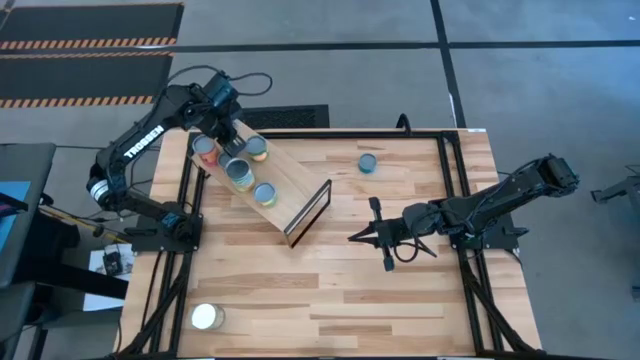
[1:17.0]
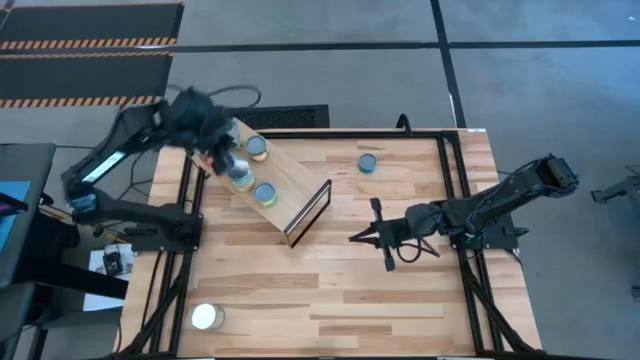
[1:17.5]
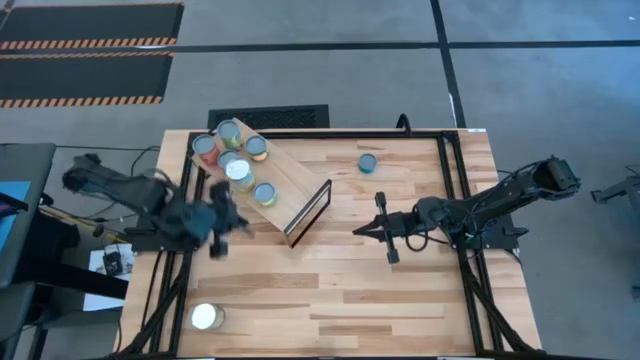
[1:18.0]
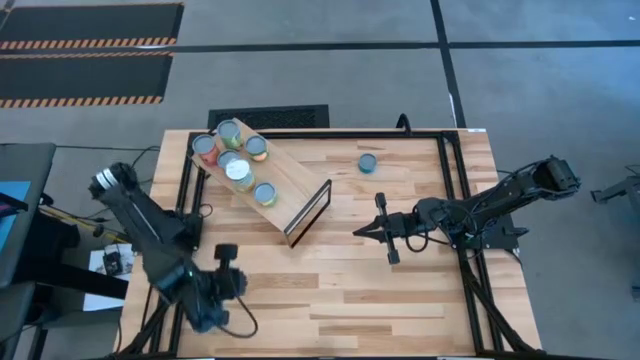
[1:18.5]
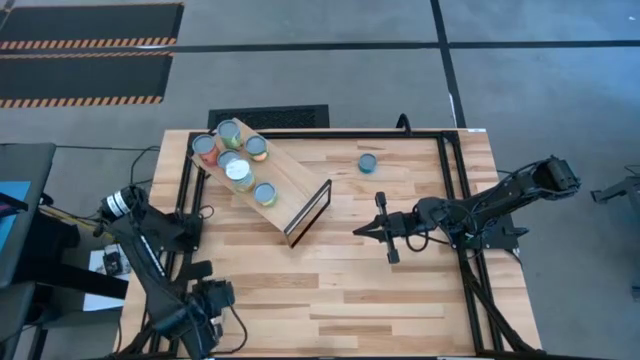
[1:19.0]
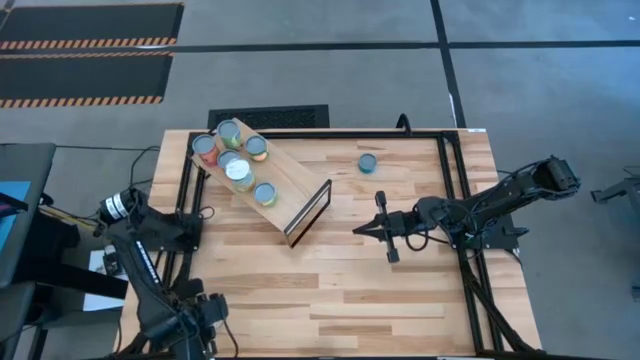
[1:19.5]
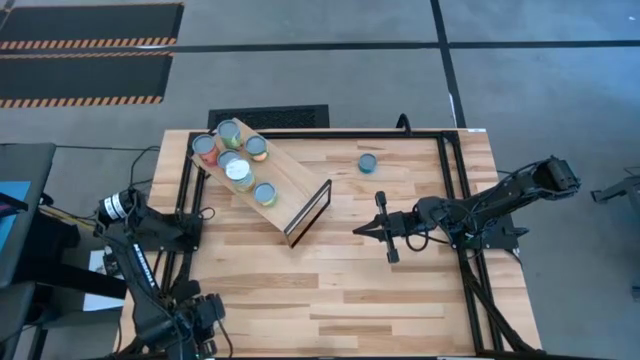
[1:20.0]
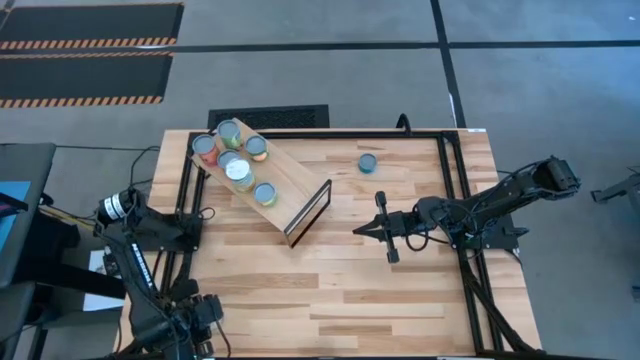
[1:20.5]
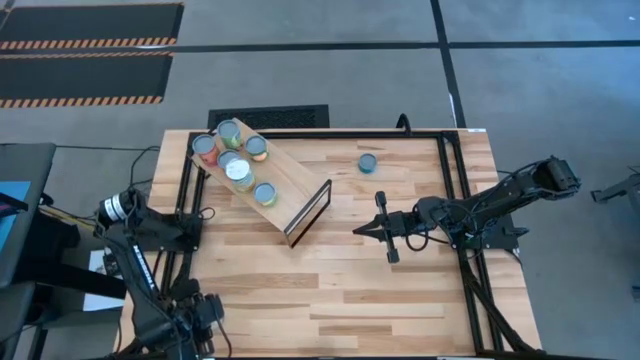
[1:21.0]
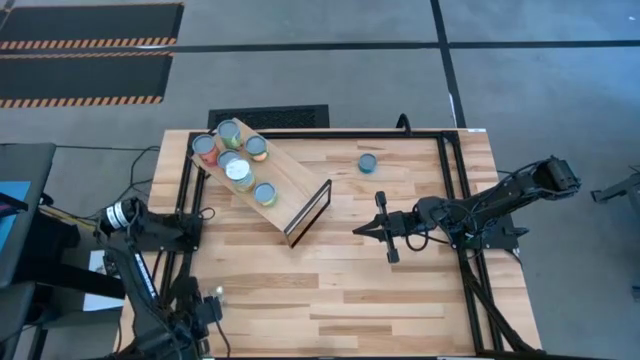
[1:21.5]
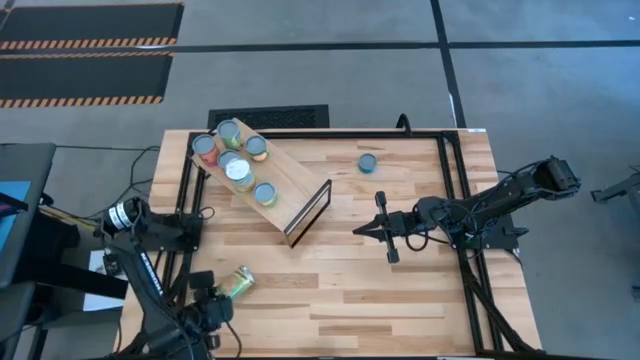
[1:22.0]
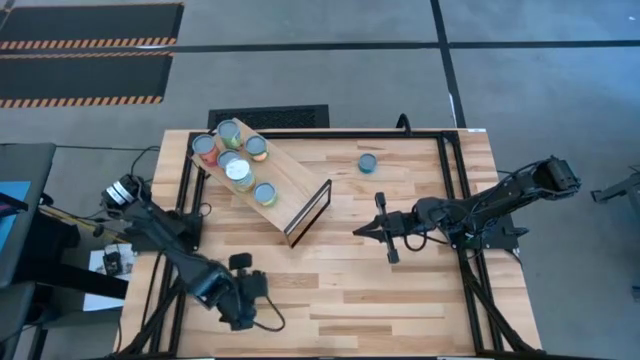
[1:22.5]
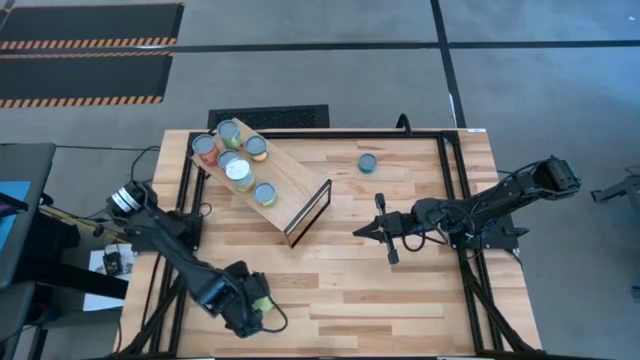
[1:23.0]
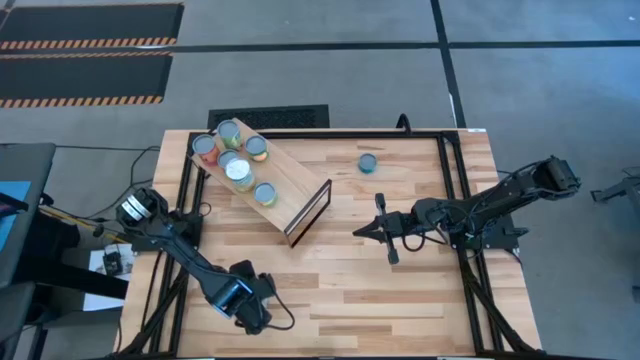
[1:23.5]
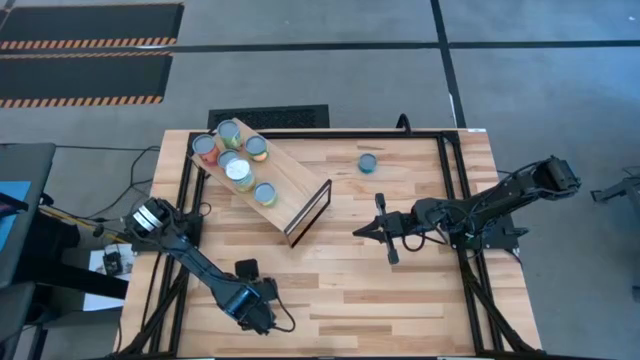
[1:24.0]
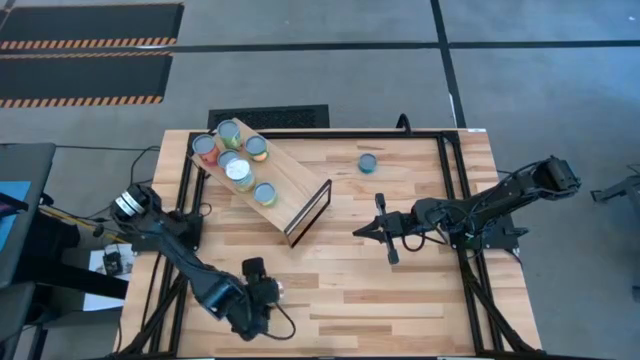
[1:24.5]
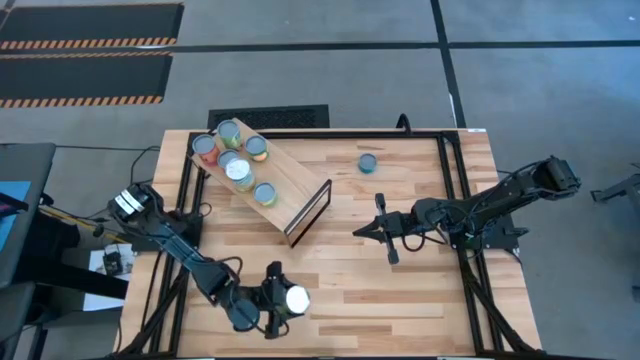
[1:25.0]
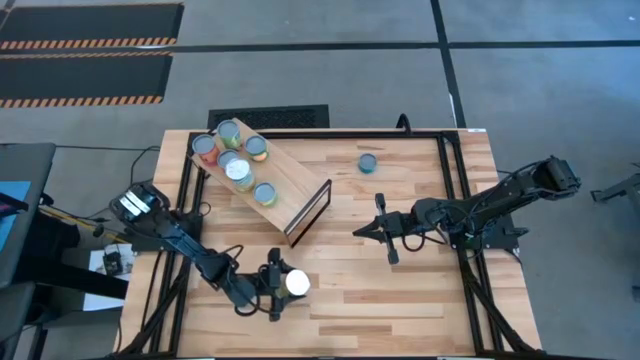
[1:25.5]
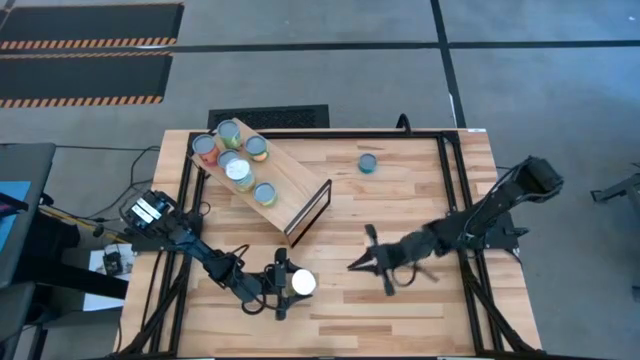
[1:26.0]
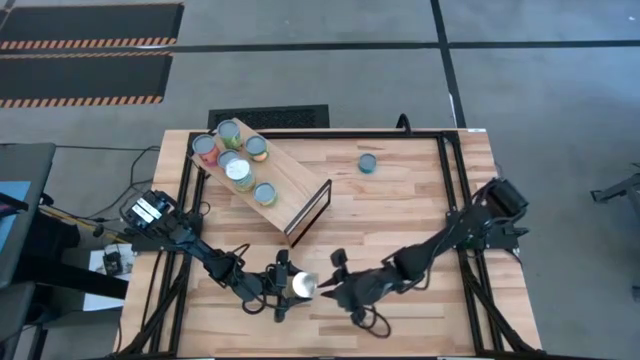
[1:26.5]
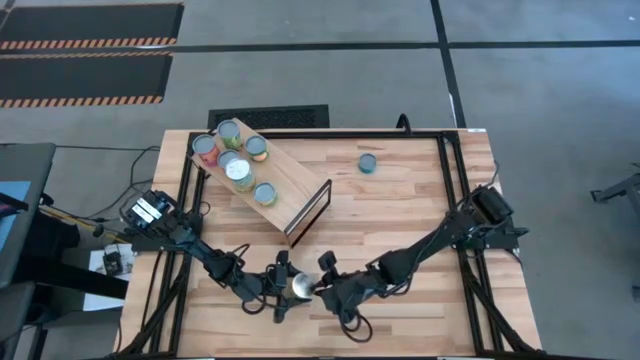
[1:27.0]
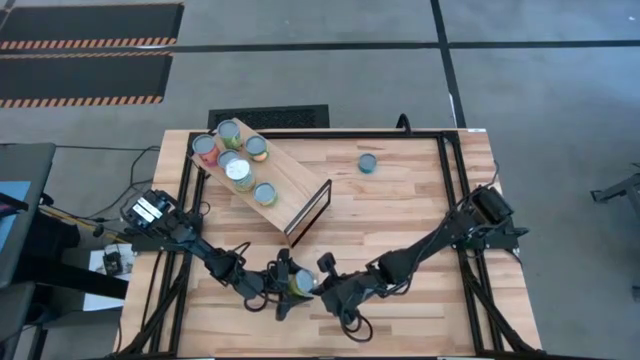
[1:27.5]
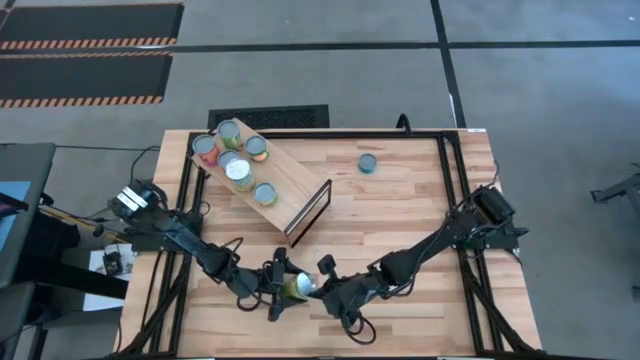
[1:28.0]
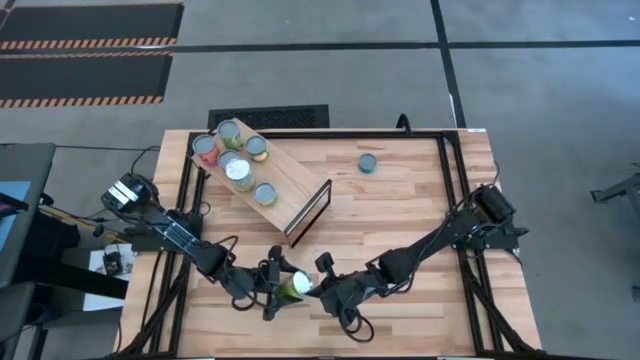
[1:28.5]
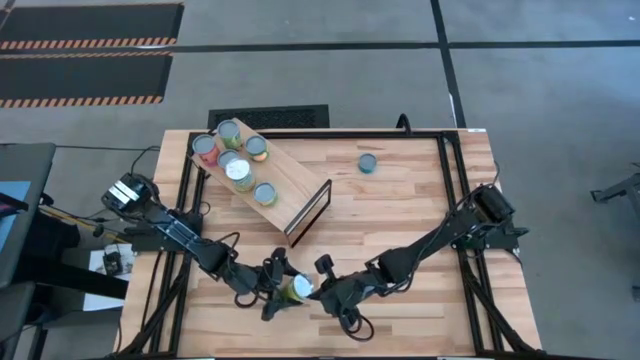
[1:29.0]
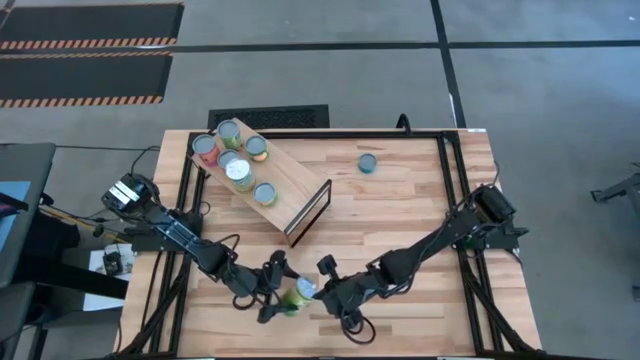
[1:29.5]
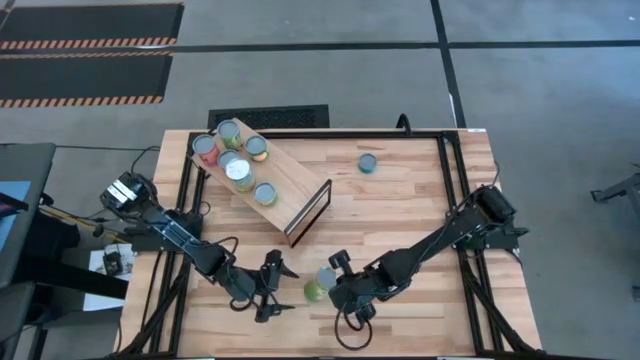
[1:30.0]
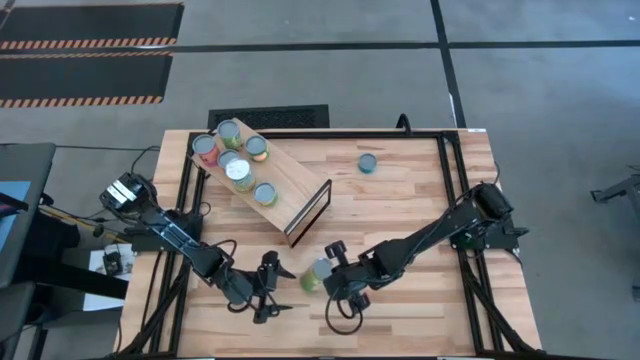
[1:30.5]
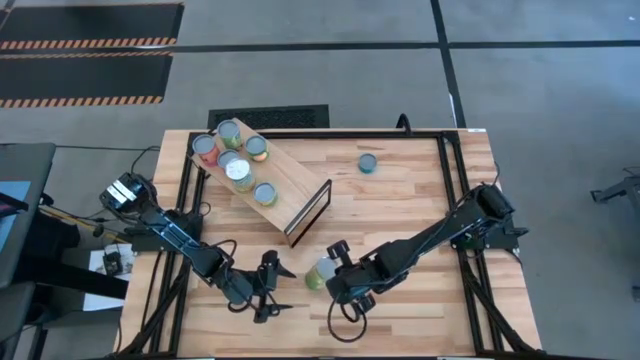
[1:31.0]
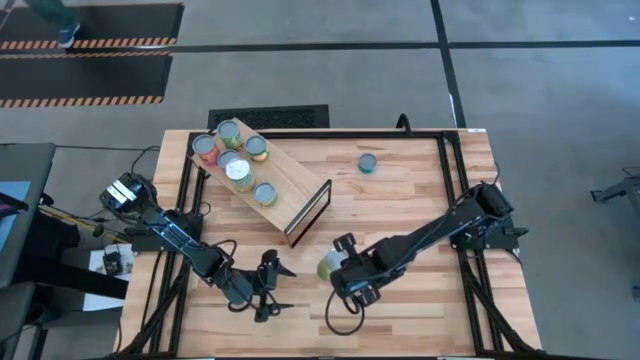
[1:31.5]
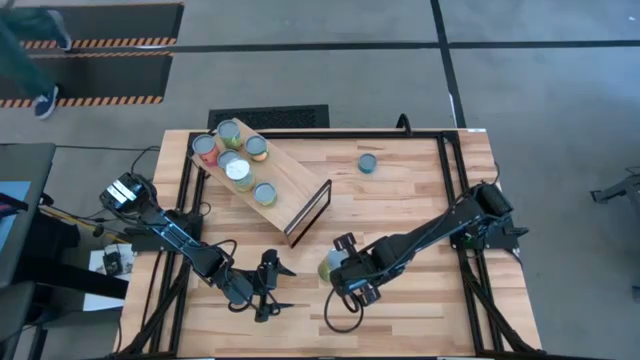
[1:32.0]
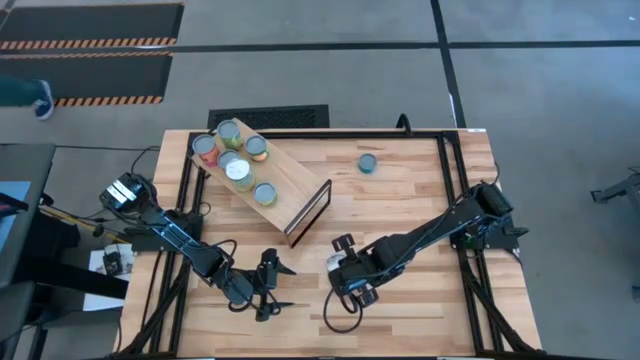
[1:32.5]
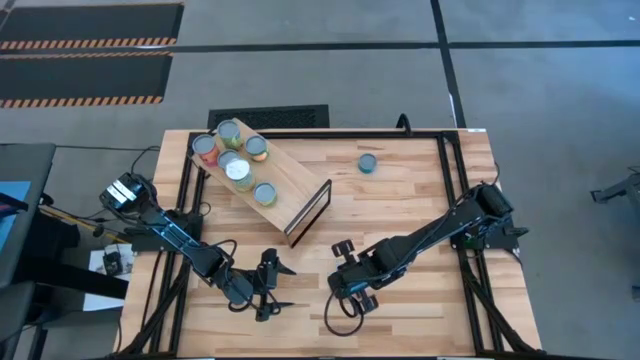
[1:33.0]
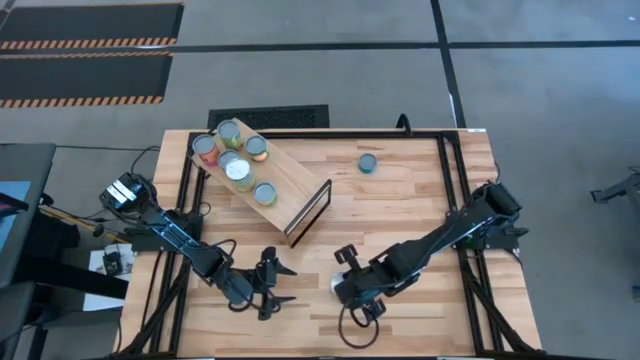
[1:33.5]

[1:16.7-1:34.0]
Task: Pick and place cans onto a shelf
Put the canned oranges on the shelf

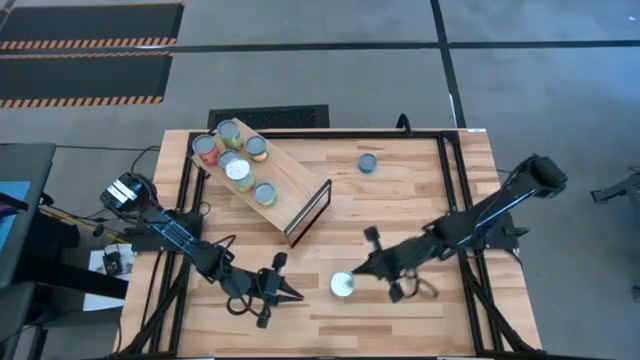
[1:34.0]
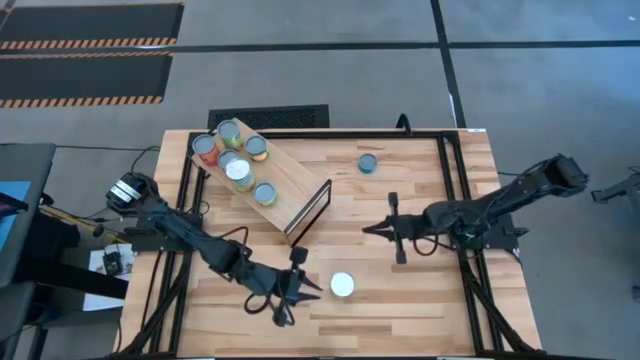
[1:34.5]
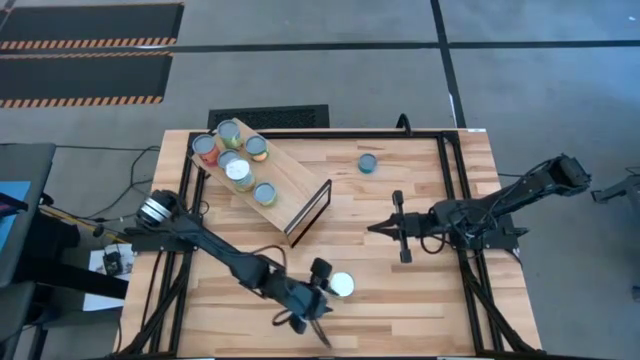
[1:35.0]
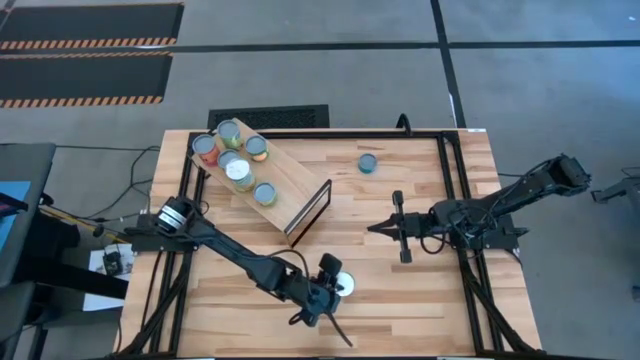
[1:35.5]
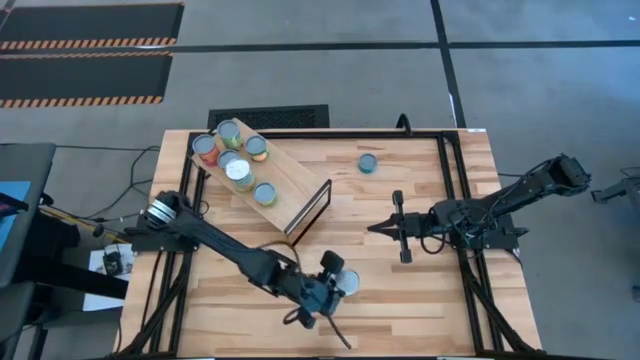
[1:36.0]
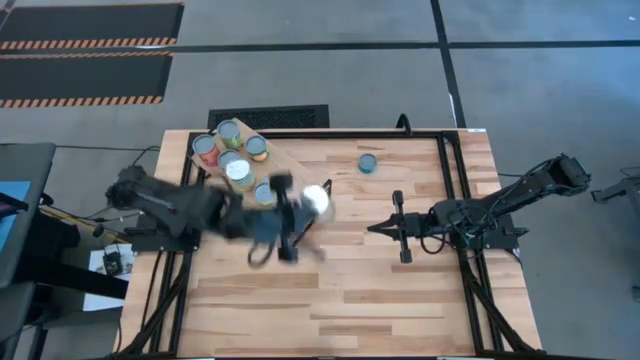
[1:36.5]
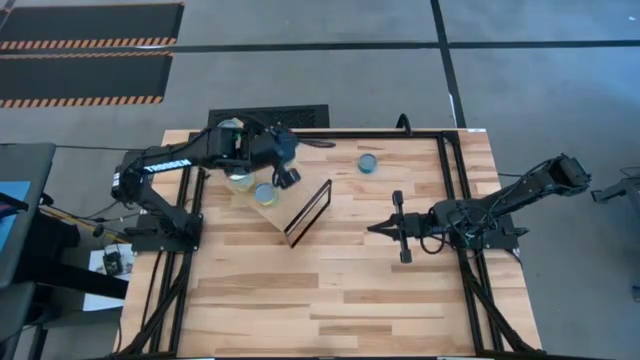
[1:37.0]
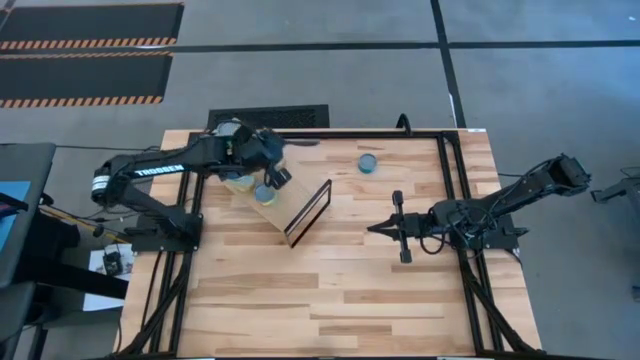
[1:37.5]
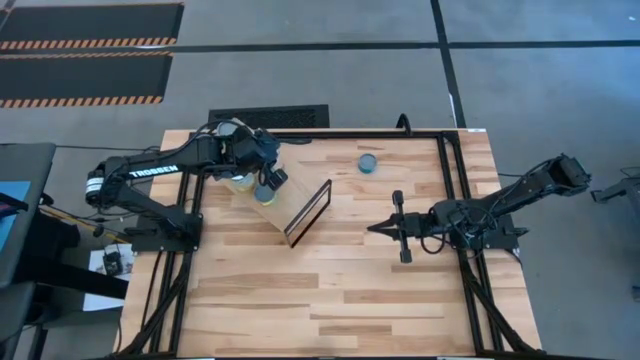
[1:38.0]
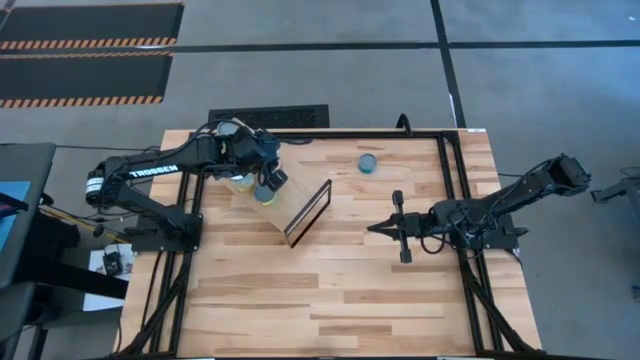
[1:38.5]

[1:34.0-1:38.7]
Put the canned oranges on the shelf
